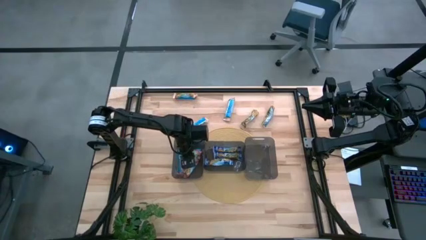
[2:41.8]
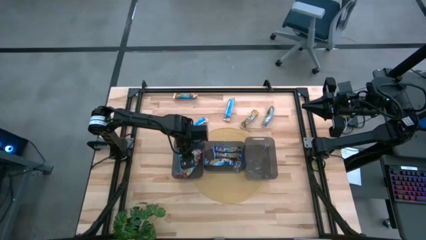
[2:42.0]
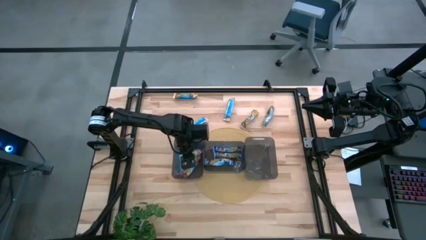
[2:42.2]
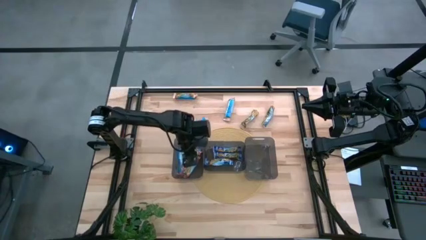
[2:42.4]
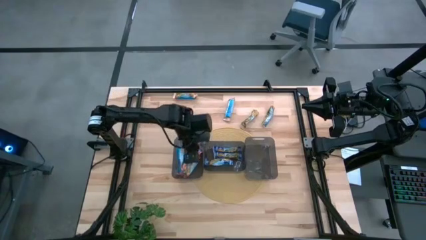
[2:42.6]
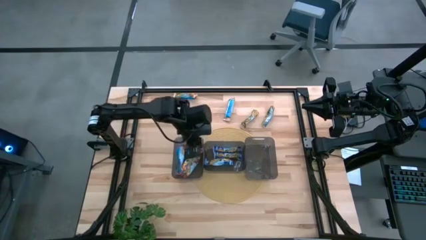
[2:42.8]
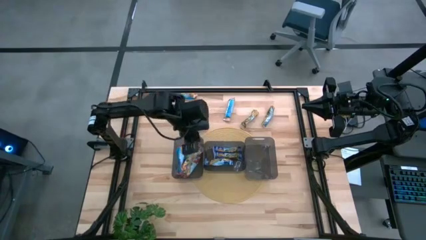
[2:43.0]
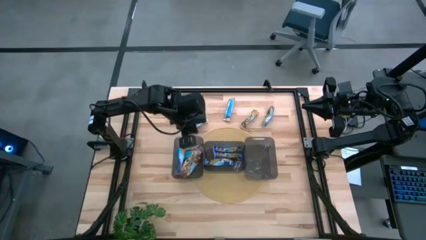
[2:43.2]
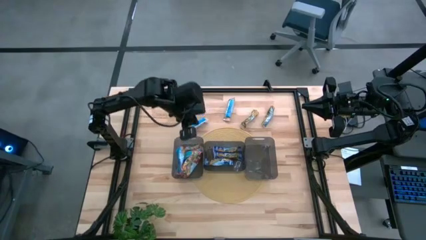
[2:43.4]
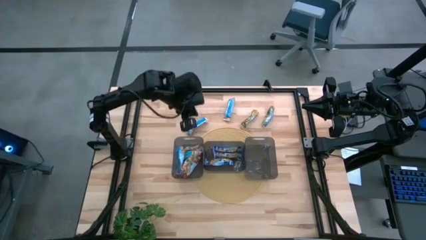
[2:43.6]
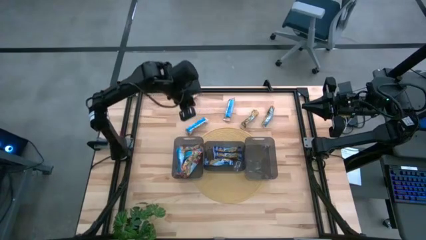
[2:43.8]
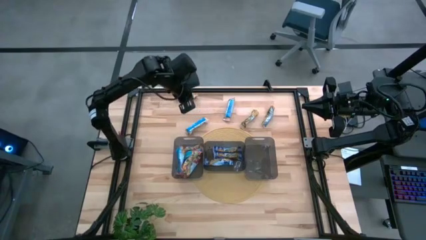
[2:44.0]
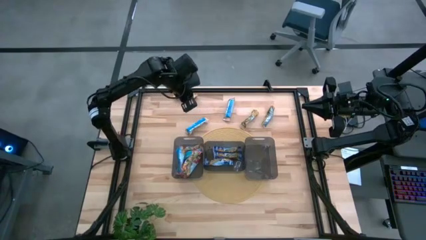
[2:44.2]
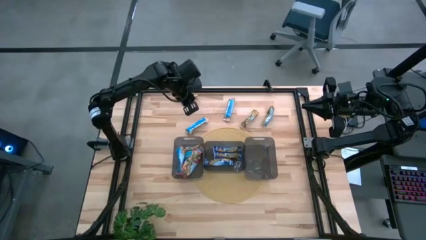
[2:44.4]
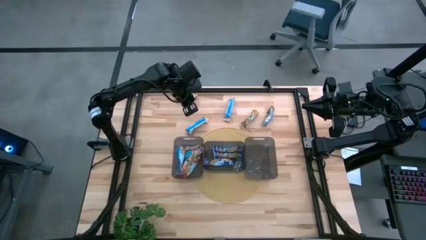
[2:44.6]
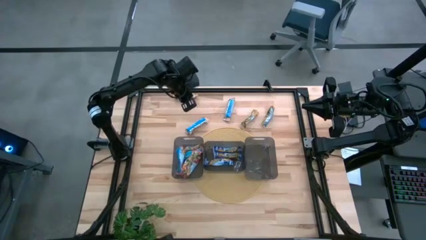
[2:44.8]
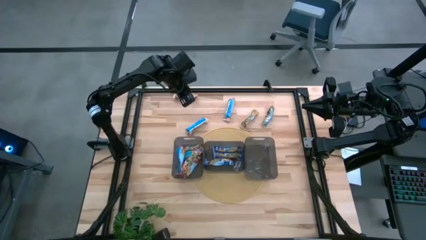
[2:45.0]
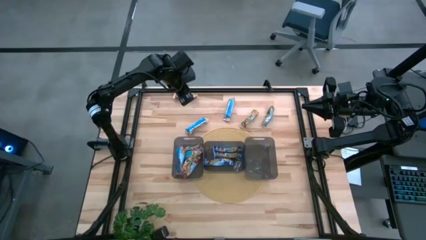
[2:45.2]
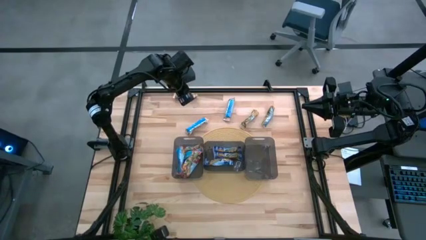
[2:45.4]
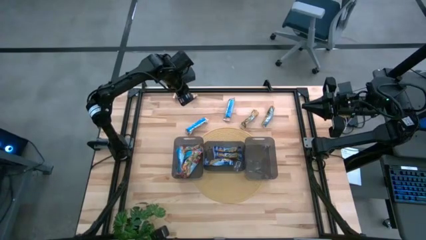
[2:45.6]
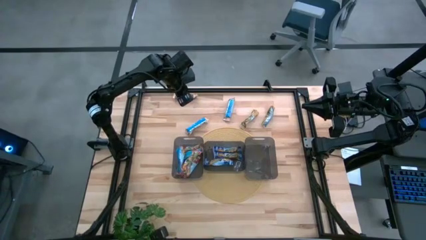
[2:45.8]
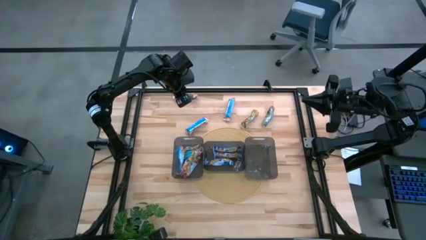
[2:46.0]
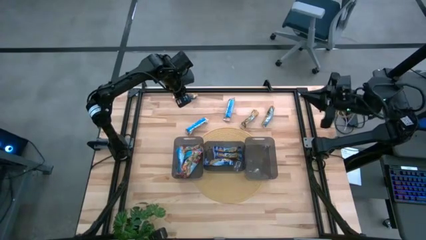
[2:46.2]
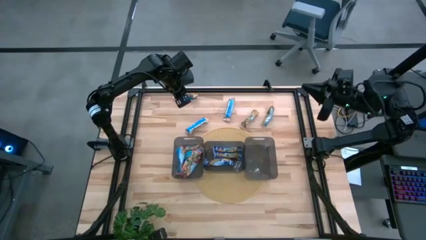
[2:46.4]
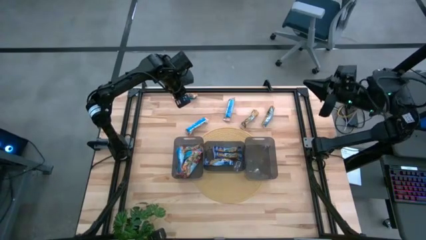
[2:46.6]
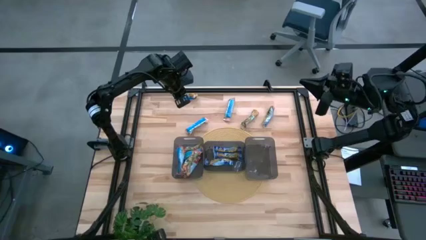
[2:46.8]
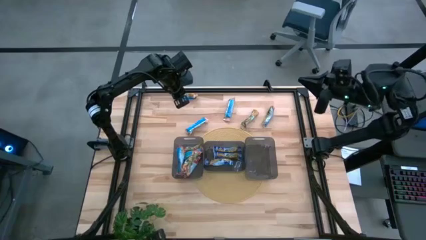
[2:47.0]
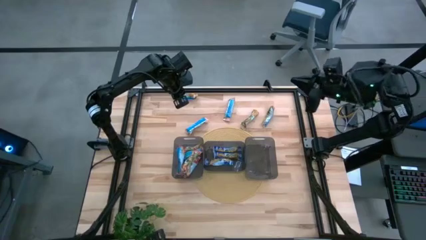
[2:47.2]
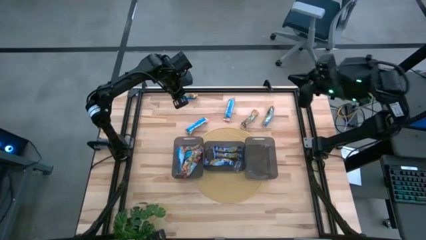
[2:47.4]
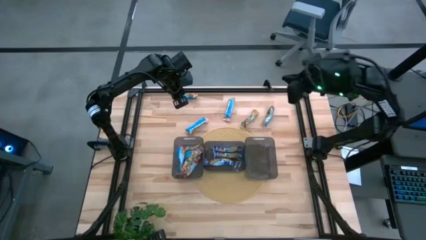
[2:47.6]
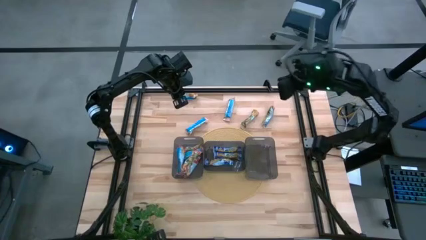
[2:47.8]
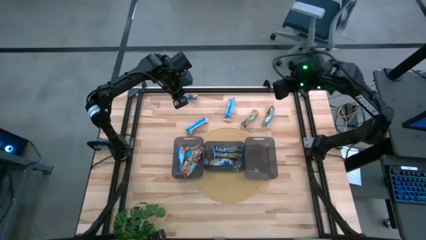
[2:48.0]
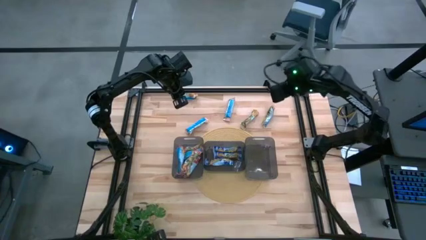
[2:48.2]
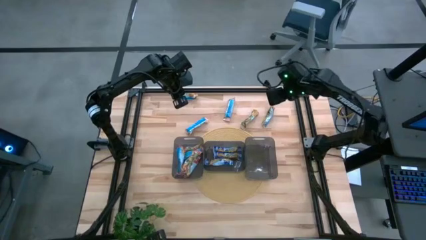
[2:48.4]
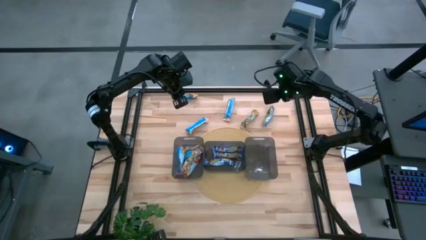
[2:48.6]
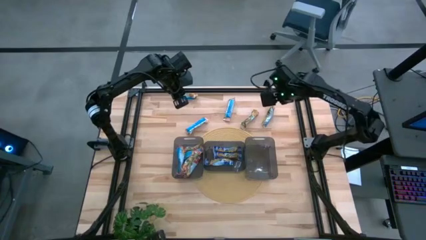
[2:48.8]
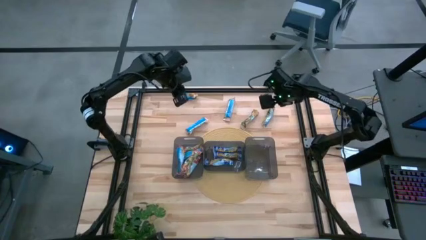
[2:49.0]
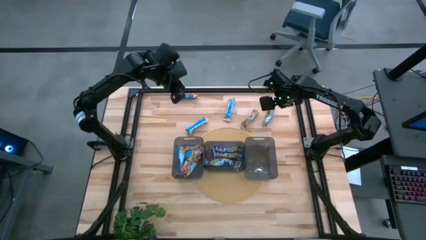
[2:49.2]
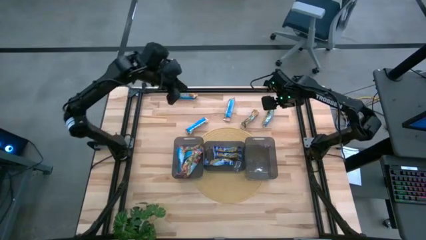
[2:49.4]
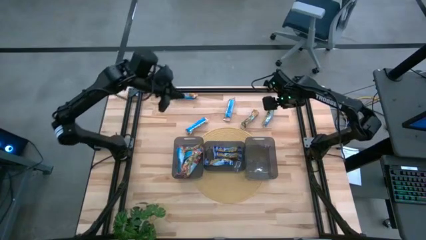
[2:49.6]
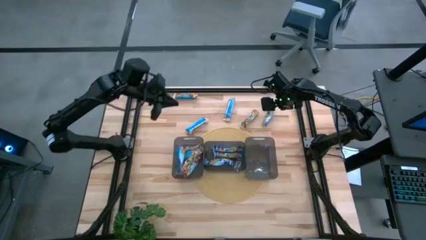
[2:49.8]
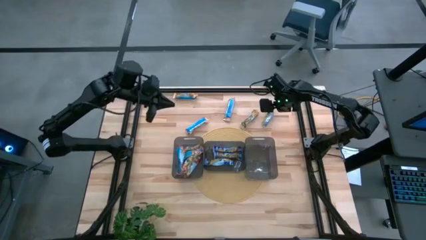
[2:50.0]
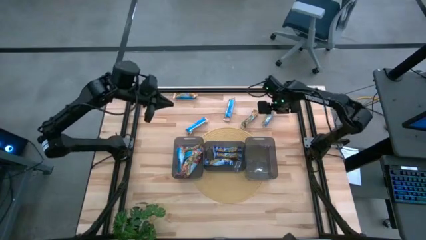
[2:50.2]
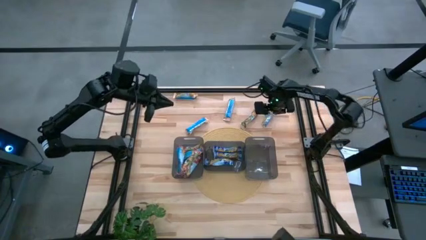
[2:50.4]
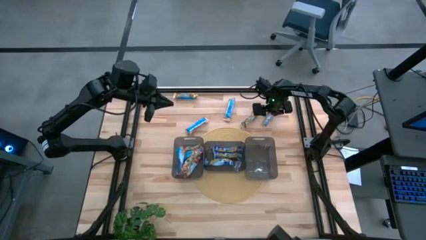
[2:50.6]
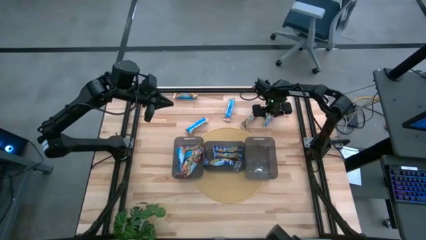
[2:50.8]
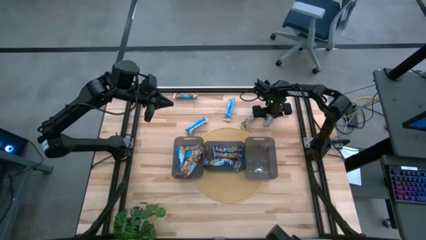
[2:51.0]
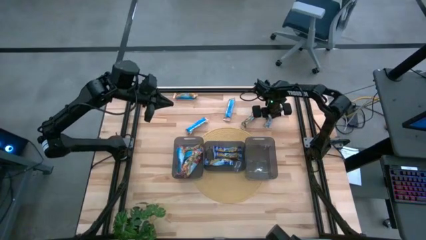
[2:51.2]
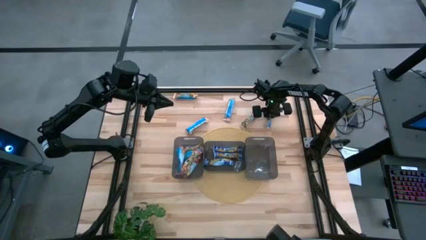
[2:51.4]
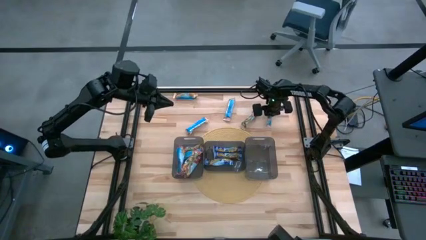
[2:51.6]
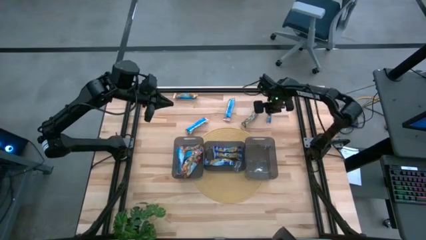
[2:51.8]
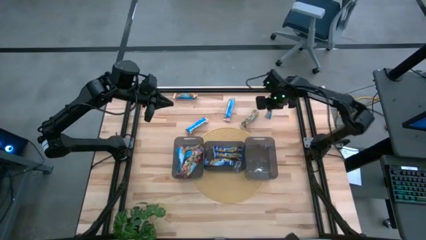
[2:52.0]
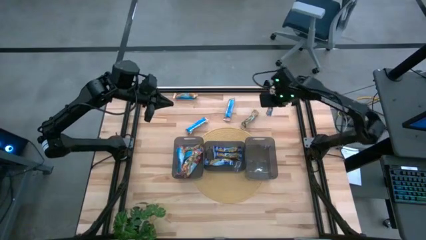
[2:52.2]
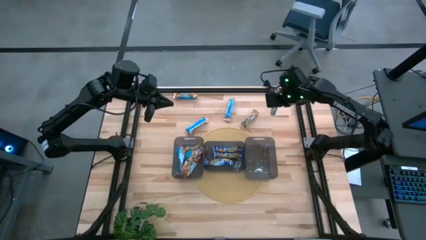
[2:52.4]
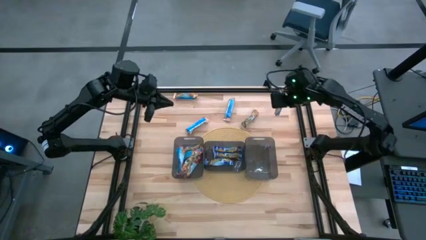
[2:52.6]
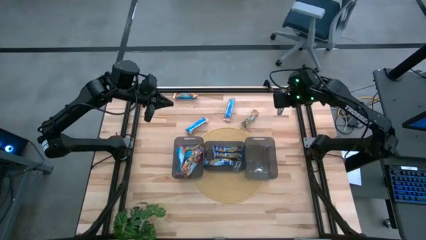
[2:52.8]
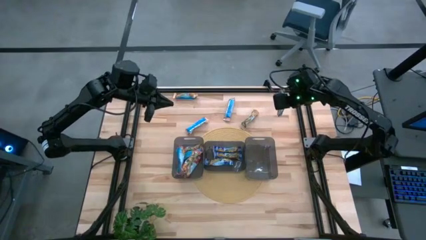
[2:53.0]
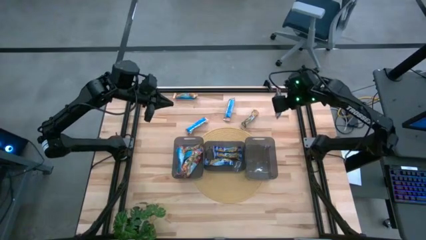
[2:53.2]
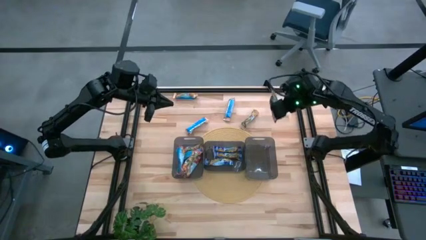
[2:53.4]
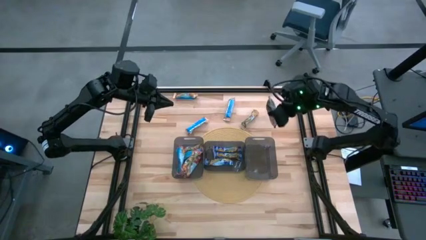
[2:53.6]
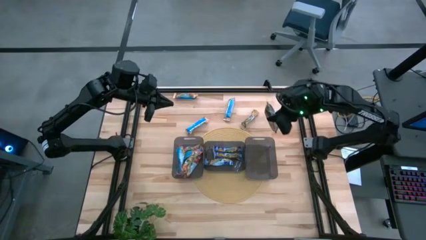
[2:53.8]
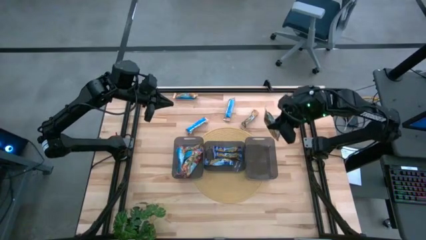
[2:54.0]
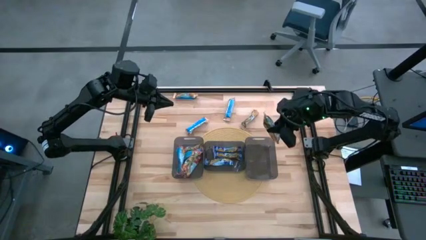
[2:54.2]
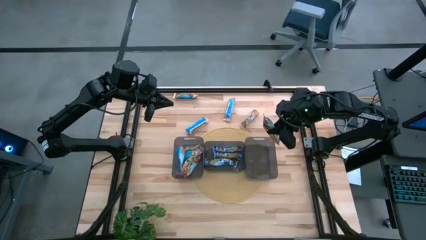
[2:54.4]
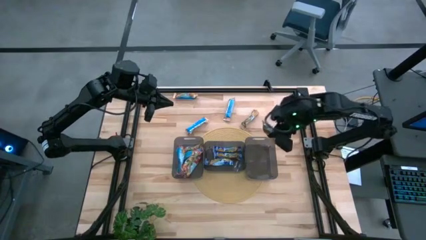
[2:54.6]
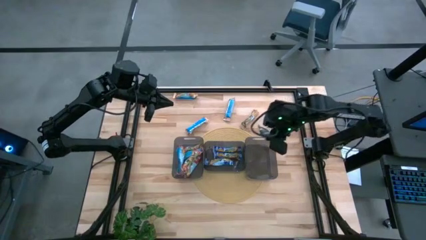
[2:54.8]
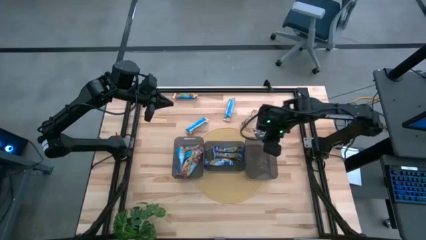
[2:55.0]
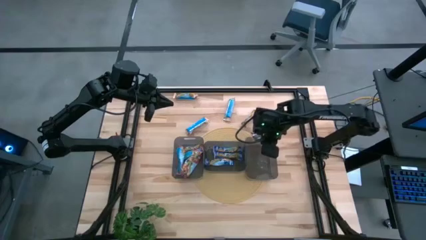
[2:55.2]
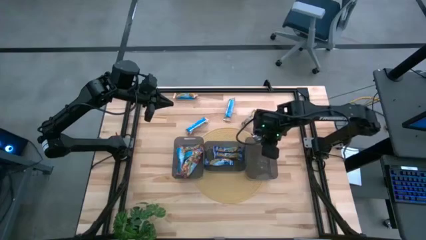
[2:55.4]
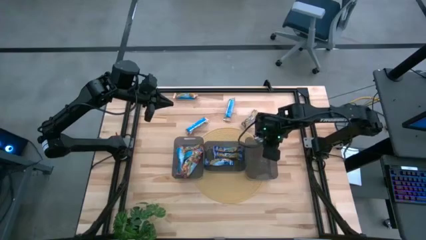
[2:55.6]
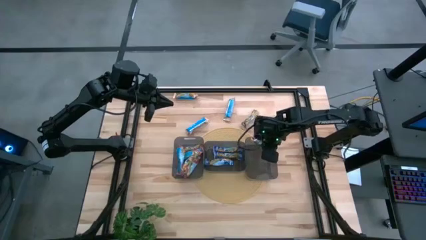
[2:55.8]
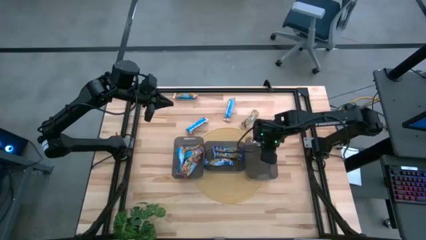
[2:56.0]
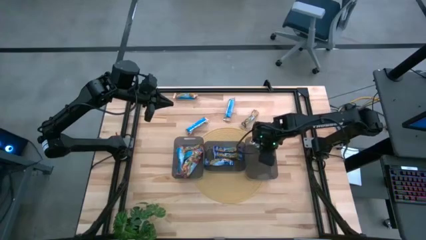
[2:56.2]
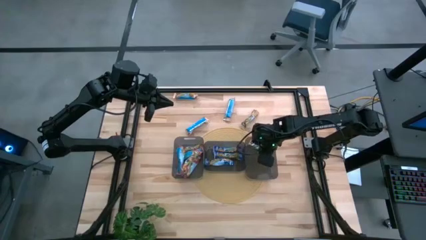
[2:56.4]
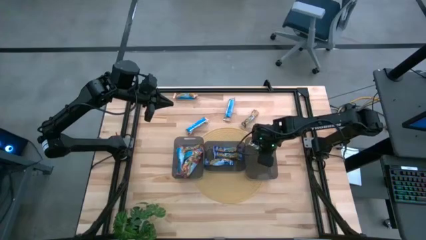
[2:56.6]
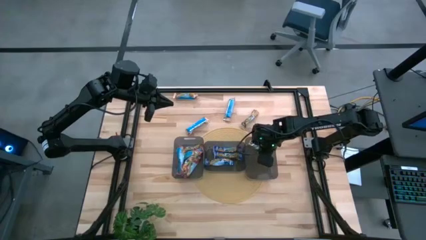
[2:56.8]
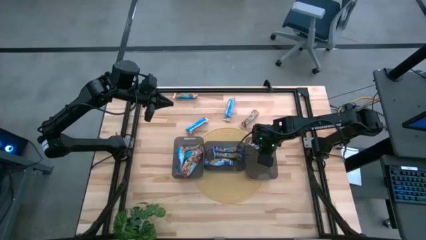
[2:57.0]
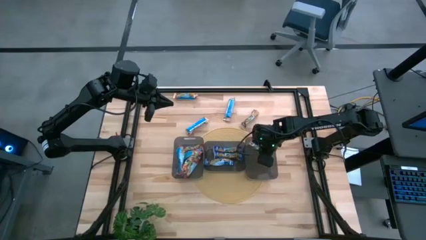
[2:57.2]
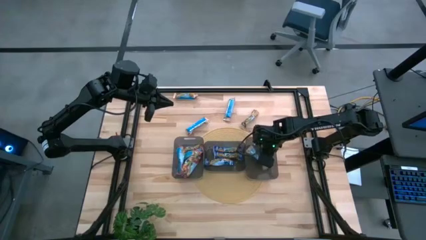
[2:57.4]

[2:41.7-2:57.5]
Task: Pick and place Granola Bars by type
Put the orange granola bar into the right black bin
